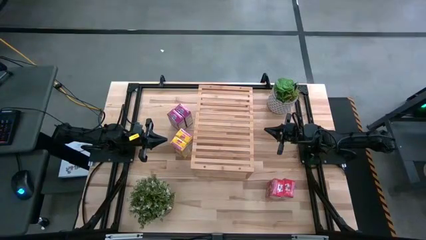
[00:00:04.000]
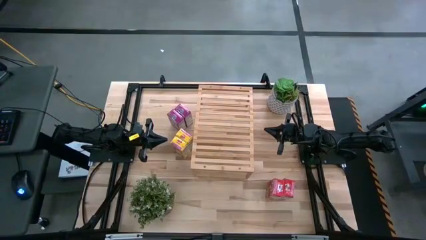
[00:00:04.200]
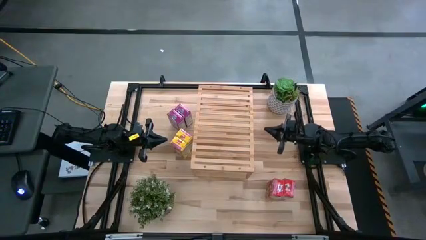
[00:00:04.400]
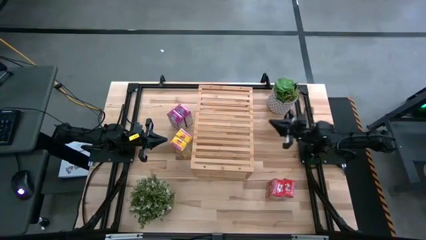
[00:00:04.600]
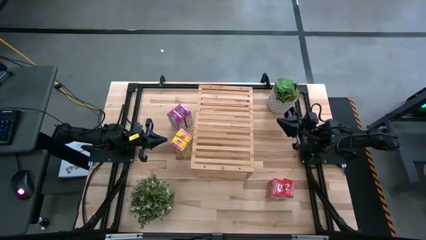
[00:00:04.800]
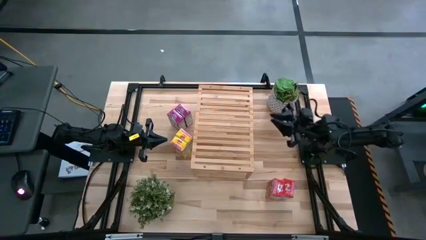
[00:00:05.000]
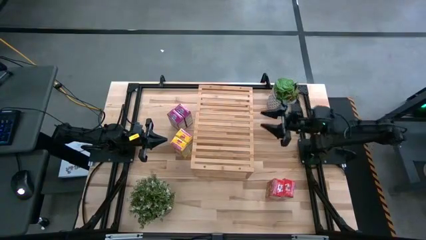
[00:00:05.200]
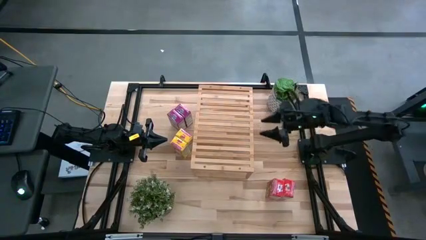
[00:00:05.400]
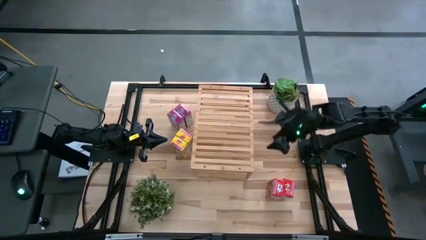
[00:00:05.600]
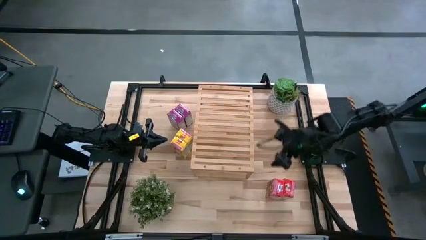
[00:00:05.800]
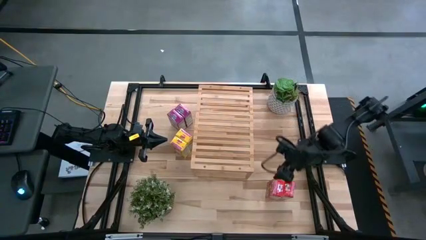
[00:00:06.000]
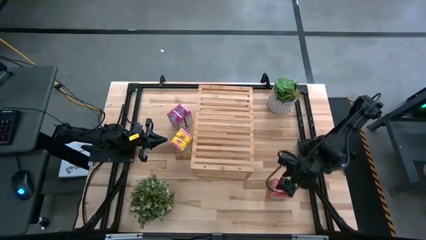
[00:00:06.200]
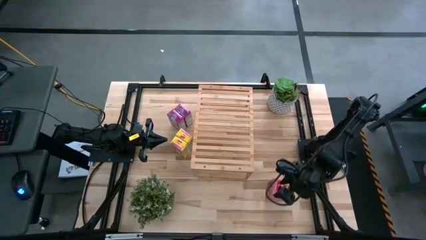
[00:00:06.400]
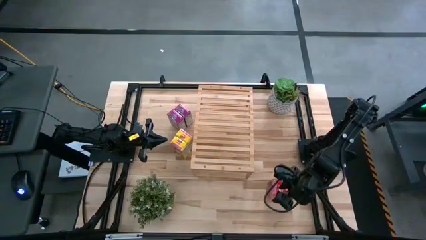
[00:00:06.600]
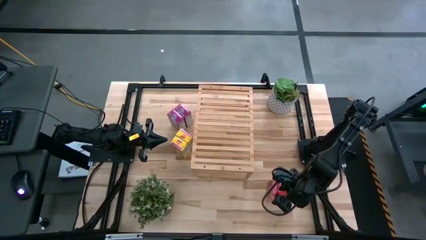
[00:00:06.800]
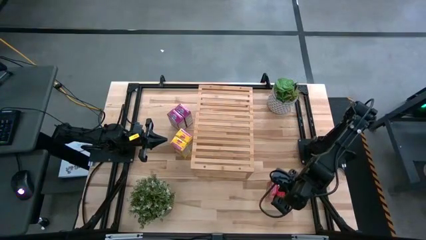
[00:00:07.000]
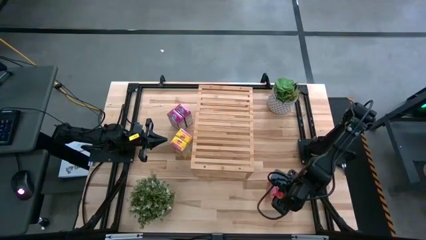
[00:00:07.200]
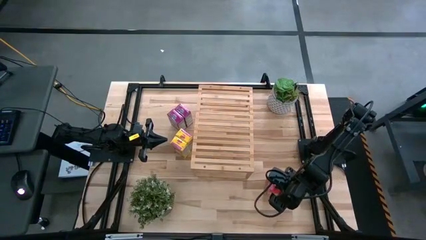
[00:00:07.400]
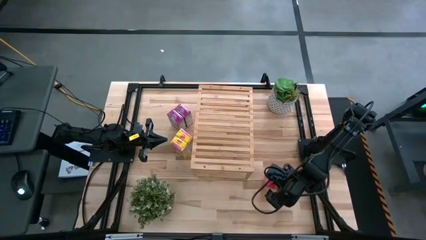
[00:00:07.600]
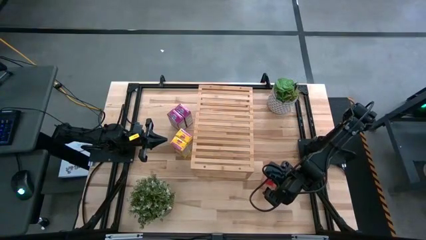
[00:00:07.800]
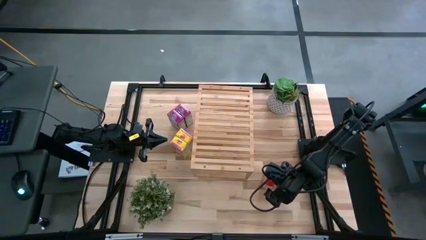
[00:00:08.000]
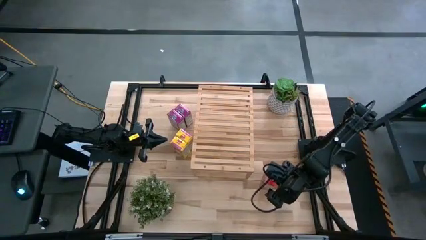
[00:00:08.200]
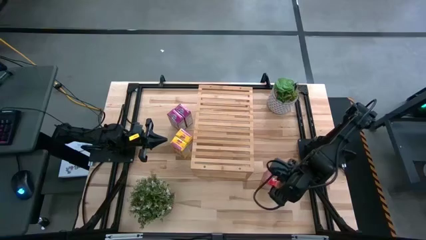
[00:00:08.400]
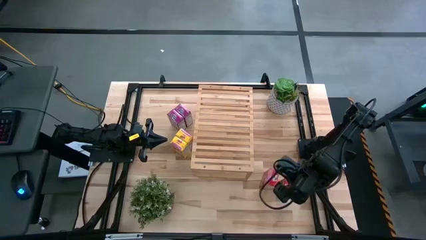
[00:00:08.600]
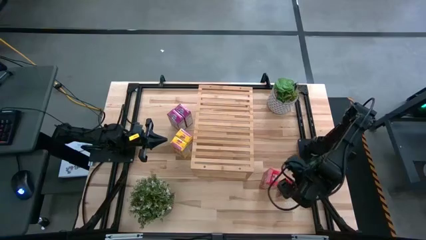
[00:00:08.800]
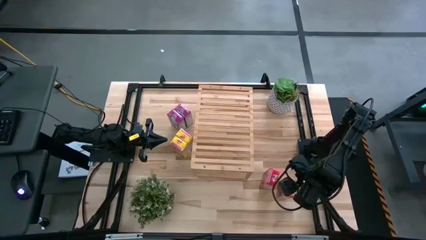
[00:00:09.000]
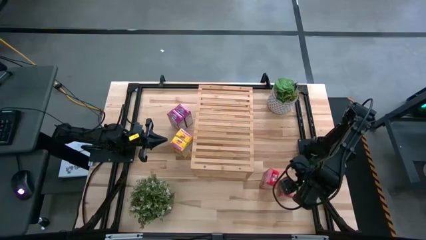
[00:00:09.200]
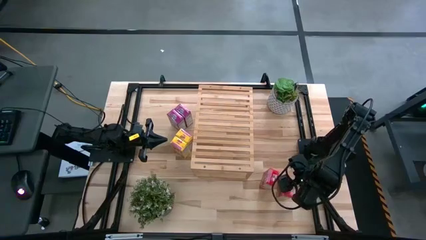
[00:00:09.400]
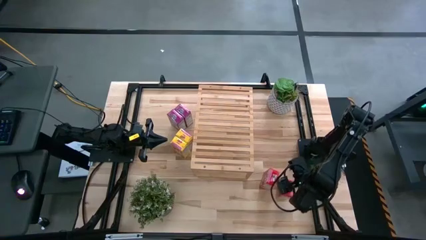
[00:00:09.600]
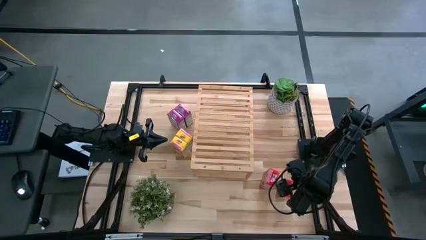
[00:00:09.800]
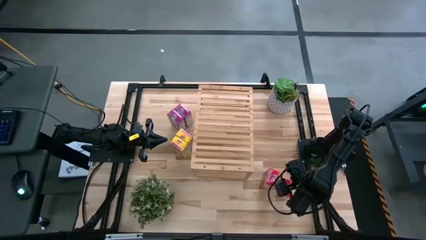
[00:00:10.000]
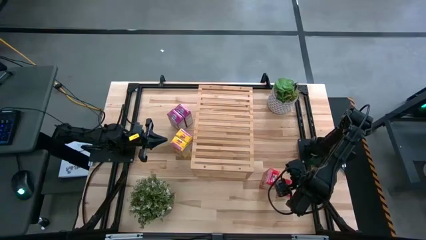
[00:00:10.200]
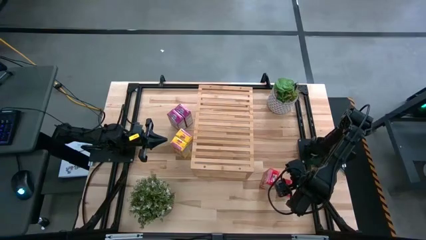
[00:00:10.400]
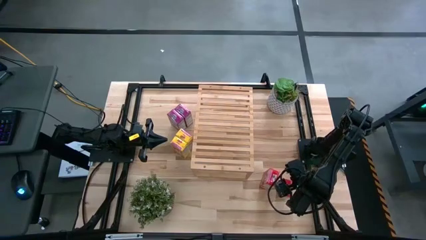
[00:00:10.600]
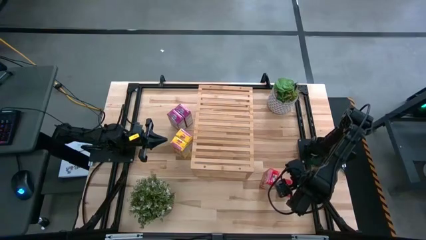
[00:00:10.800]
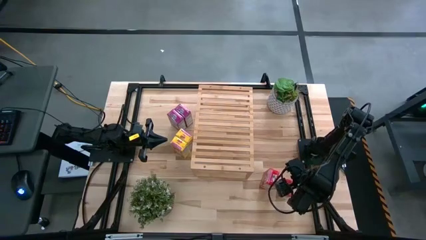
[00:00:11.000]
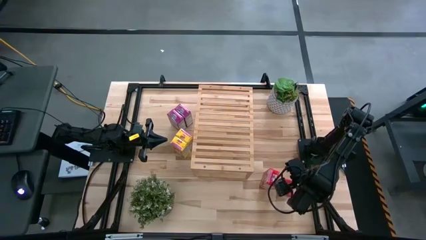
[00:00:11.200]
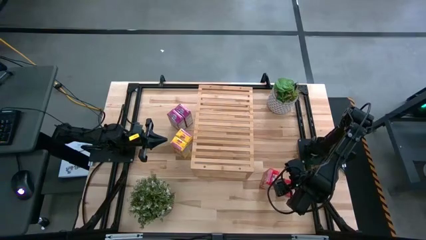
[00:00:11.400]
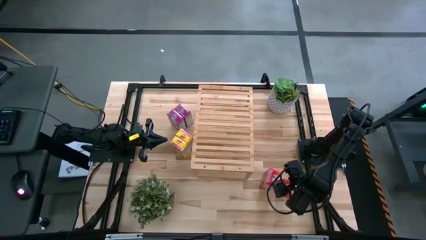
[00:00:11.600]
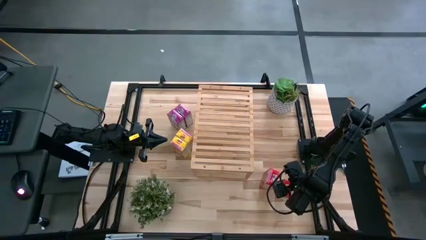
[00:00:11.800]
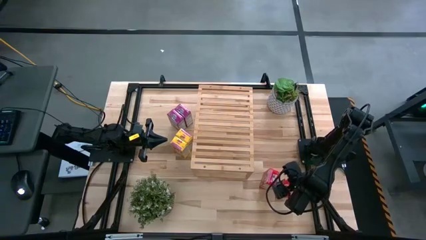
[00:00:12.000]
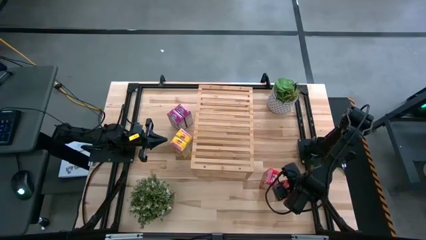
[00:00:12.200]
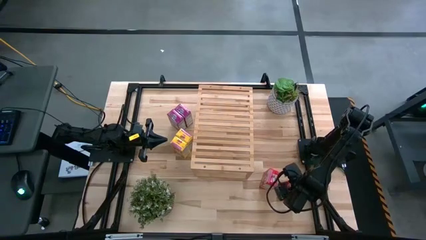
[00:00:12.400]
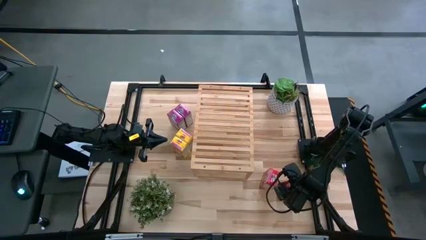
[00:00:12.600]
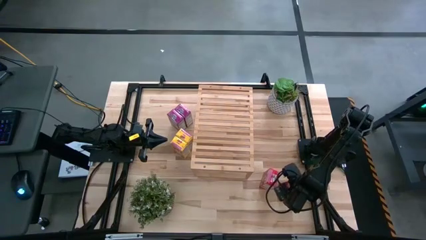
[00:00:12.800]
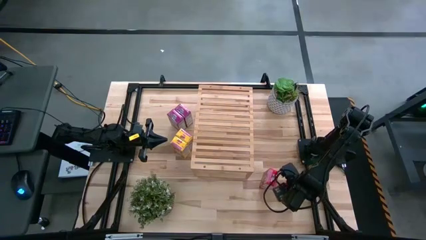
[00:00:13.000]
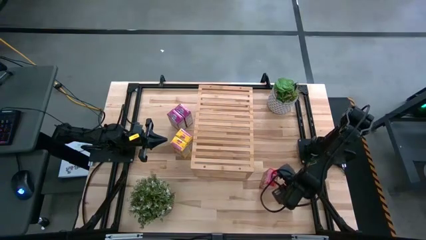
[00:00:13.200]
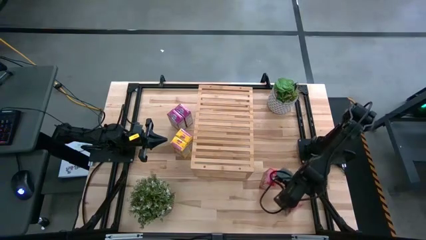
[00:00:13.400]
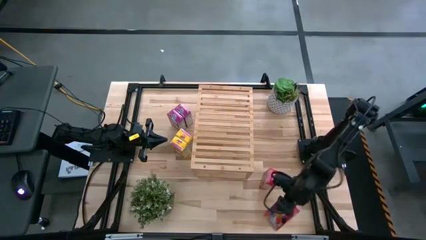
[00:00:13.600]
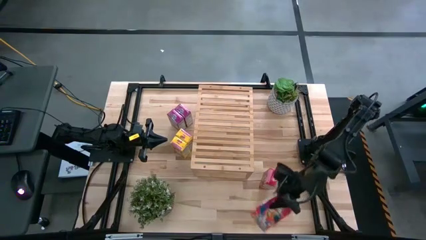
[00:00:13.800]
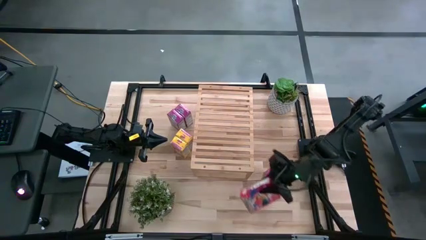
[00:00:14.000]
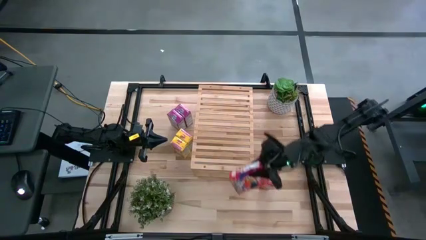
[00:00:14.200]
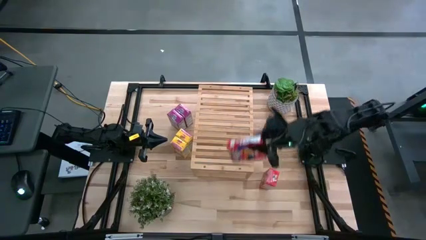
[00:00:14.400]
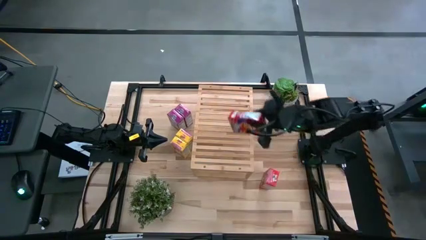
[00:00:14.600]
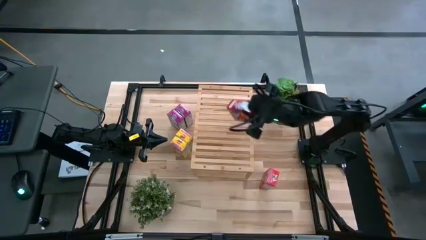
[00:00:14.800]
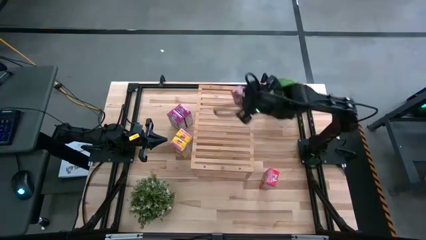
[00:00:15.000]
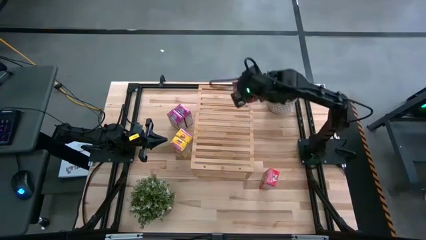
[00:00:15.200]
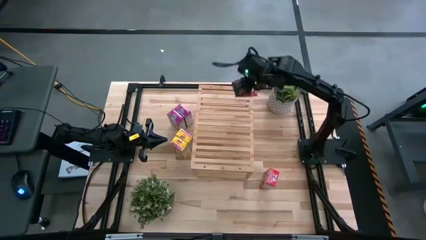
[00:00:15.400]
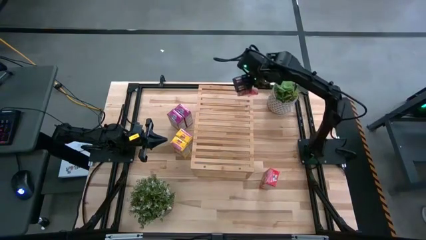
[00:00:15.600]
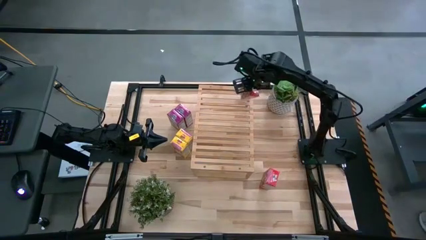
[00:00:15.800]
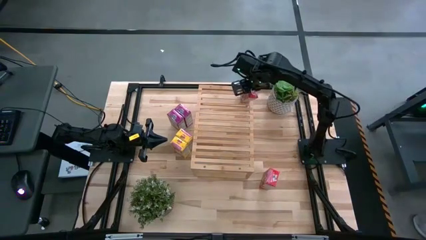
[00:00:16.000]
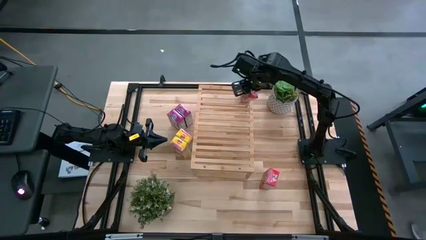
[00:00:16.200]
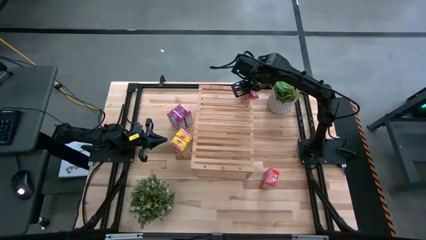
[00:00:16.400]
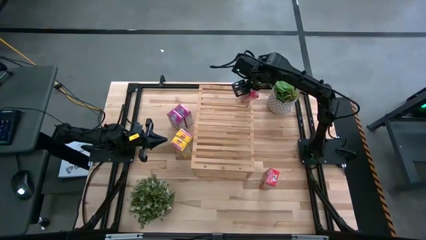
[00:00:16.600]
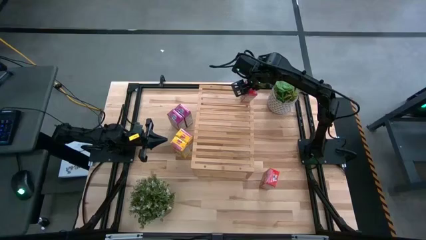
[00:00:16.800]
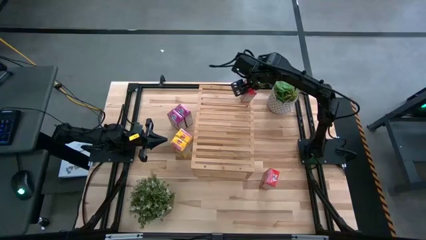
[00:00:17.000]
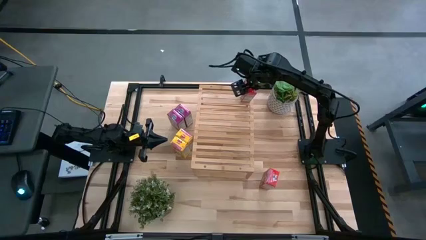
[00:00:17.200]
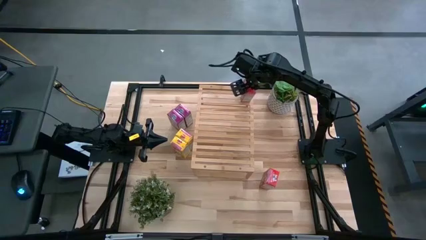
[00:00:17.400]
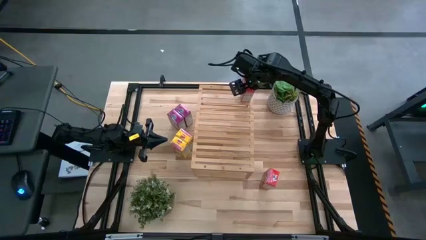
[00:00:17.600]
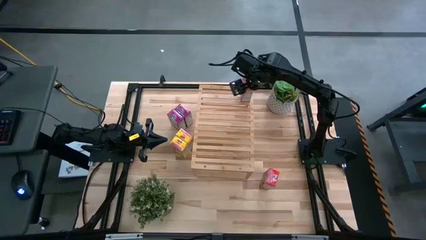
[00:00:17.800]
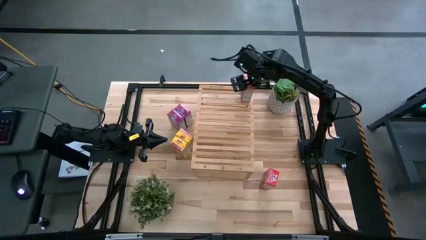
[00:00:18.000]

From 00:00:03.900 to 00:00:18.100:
Task: Stack cereal on shelf
Put the right red cereal box on the shelf

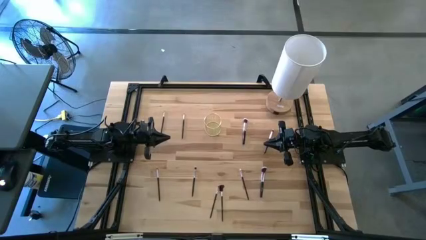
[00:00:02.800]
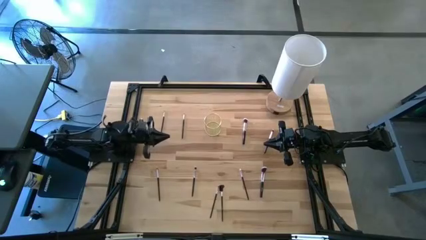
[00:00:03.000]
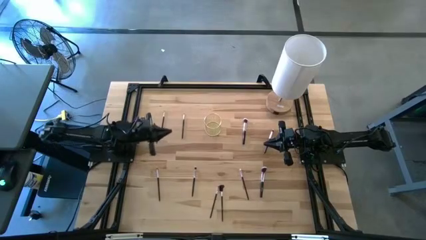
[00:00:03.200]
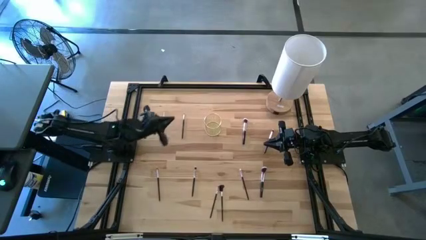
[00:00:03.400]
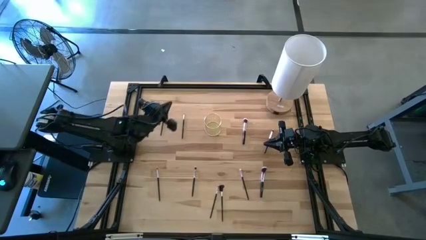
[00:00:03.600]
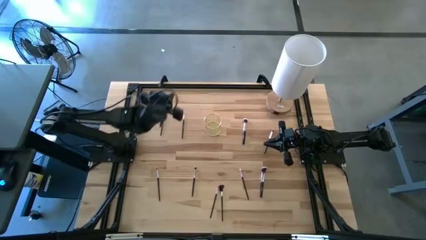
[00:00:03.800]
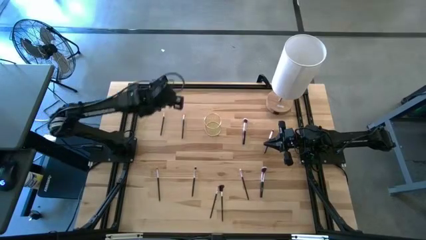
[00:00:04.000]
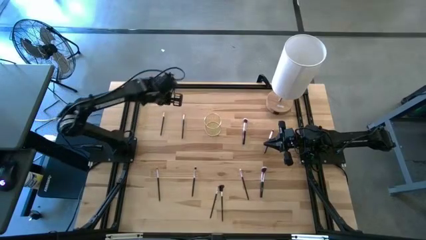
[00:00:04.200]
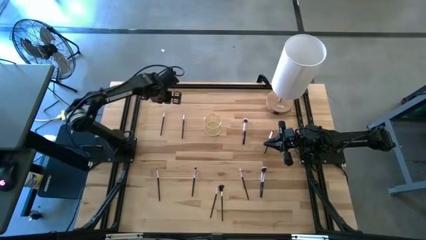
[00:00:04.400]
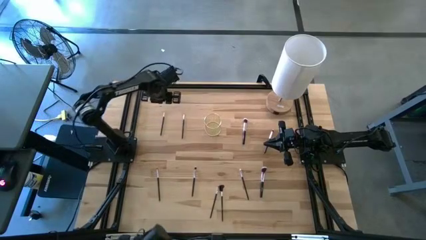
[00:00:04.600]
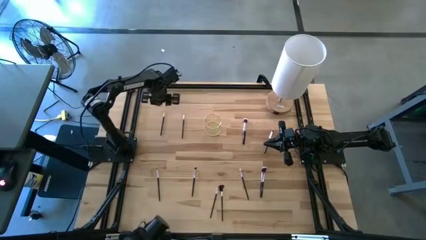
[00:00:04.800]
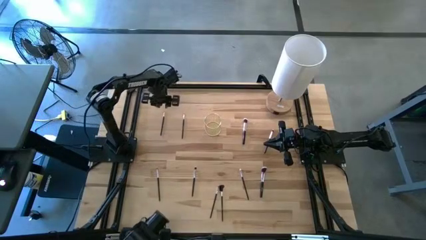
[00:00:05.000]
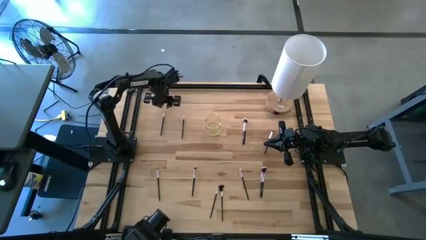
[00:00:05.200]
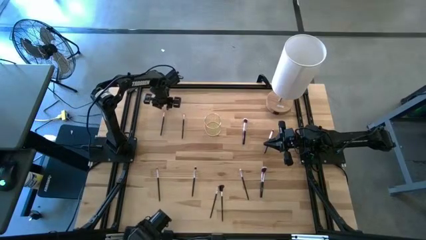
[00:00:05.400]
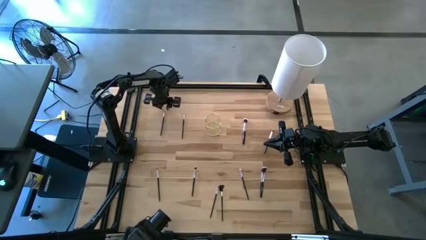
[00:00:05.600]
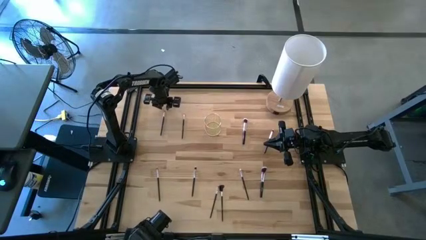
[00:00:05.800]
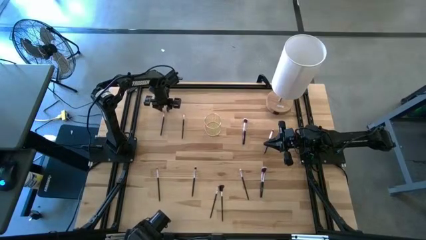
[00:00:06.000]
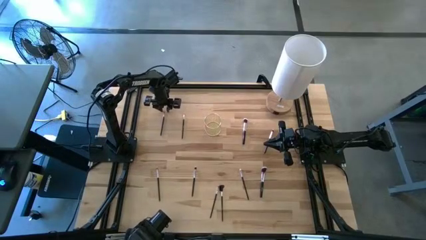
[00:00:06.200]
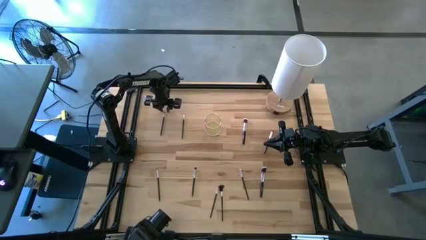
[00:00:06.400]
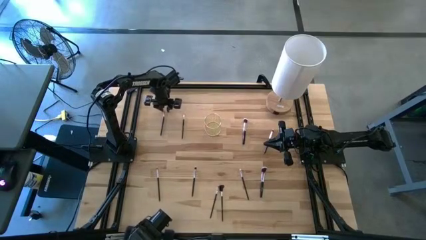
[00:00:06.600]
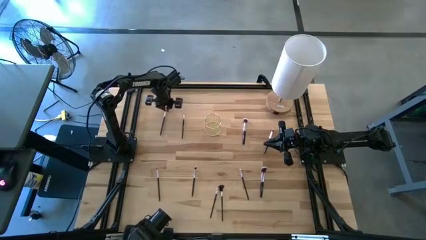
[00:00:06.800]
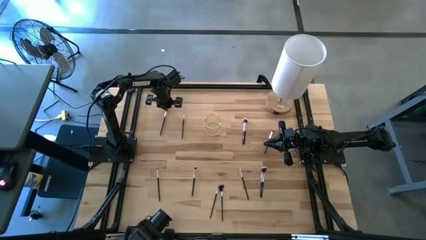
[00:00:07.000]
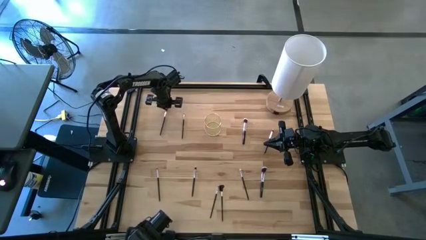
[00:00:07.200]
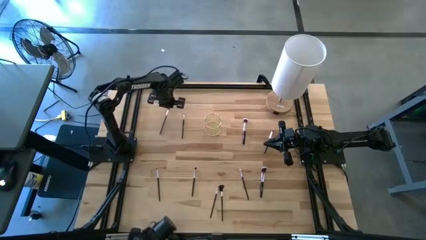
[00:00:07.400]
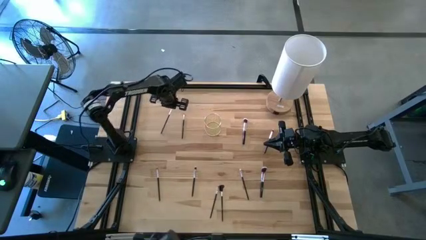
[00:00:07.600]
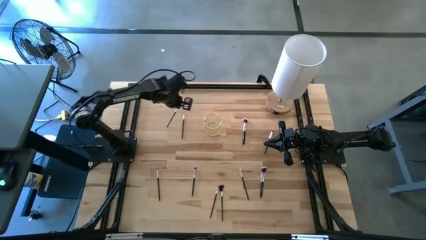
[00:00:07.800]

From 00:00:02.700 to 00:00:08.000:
Task: Put items in baskets/containers
Put the black eyeshadow brush into the gold container
